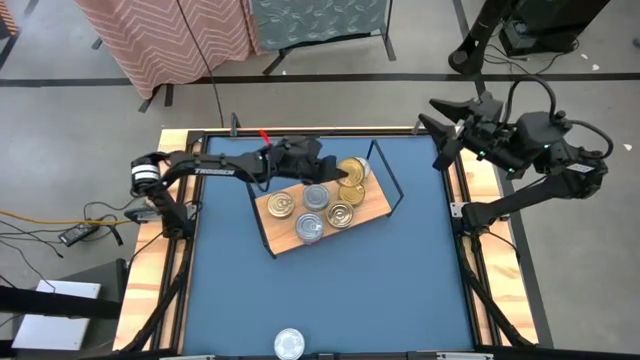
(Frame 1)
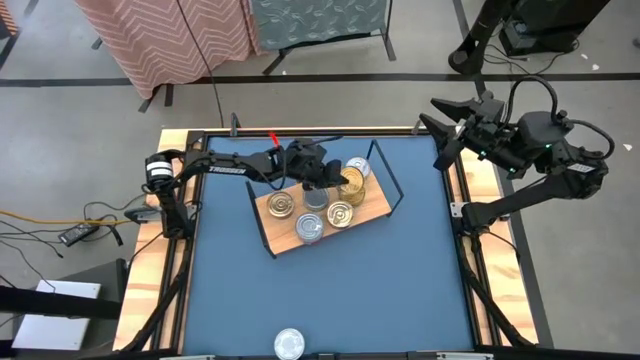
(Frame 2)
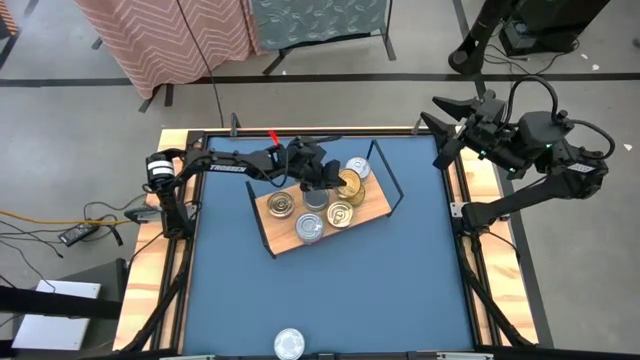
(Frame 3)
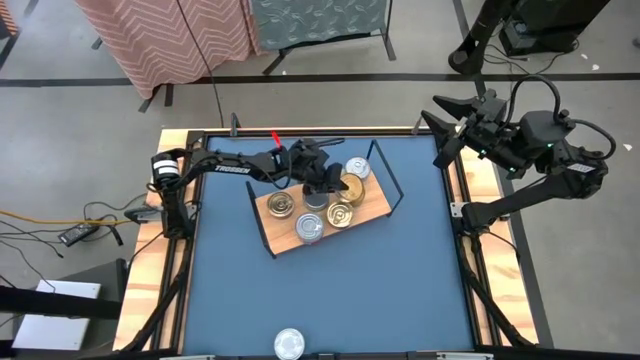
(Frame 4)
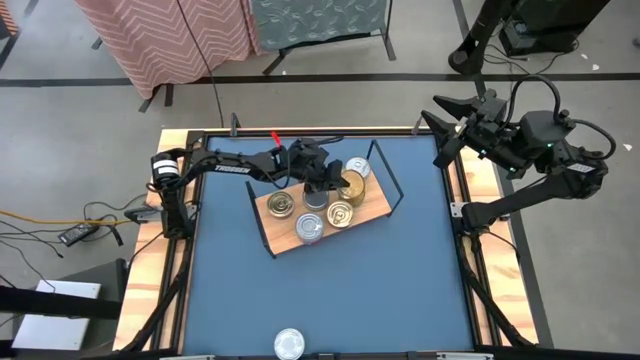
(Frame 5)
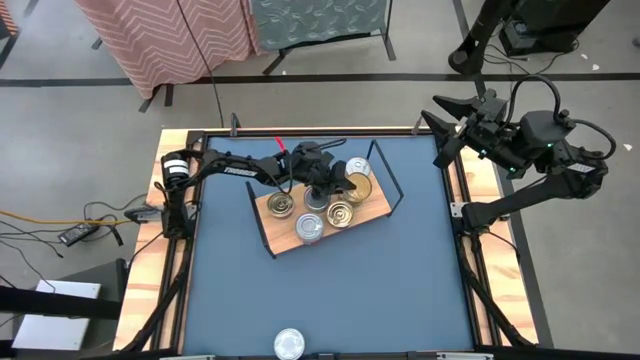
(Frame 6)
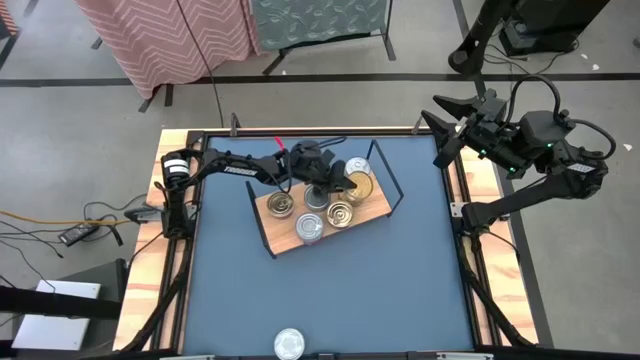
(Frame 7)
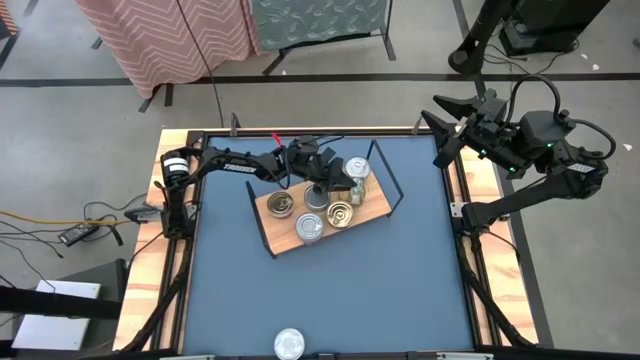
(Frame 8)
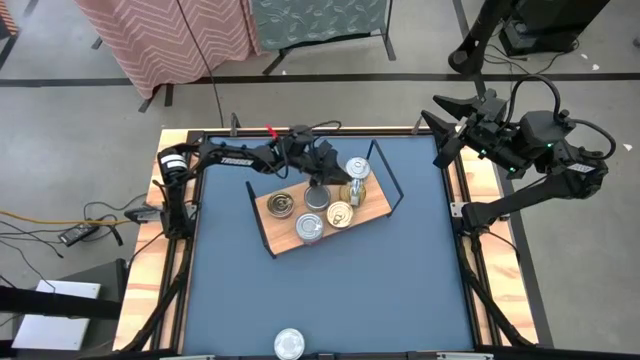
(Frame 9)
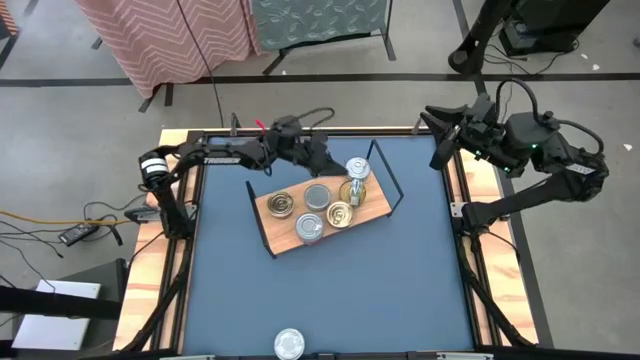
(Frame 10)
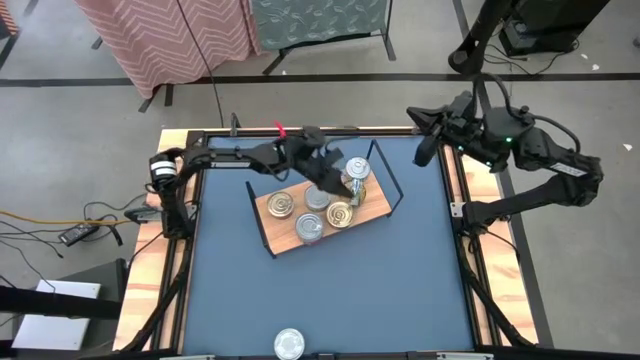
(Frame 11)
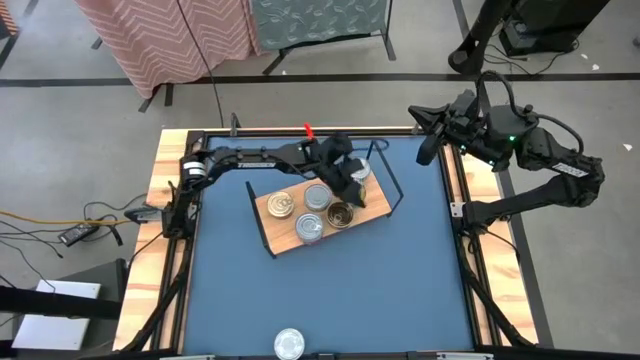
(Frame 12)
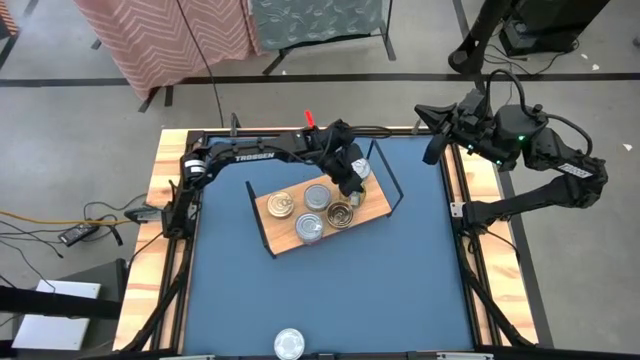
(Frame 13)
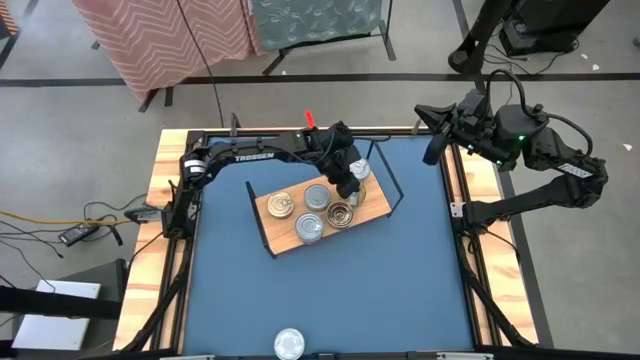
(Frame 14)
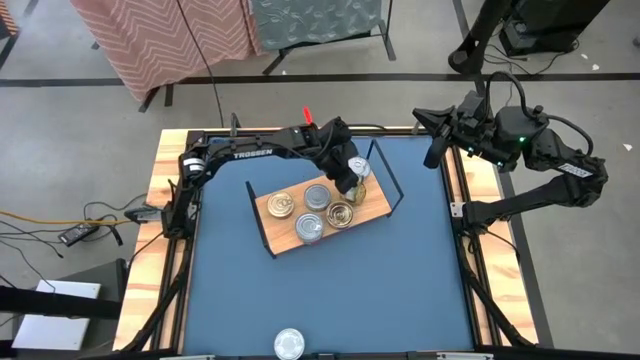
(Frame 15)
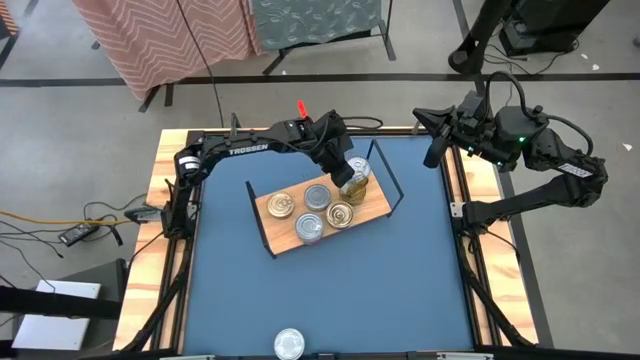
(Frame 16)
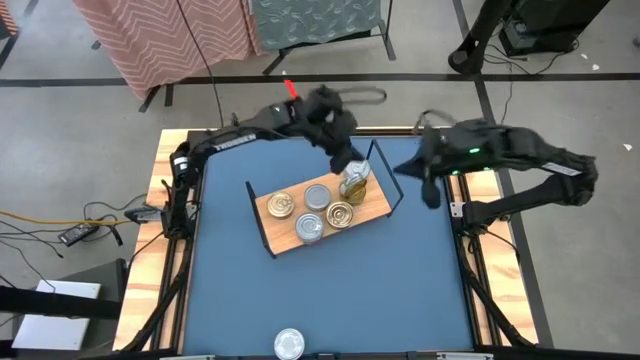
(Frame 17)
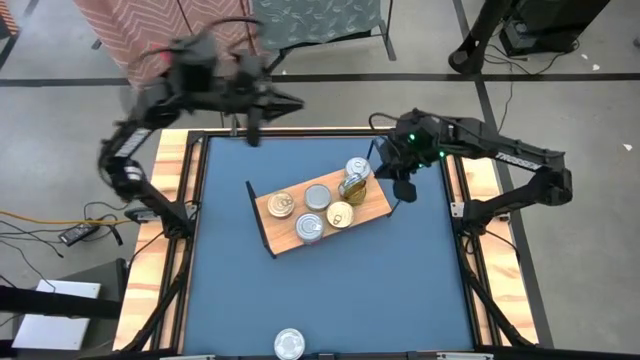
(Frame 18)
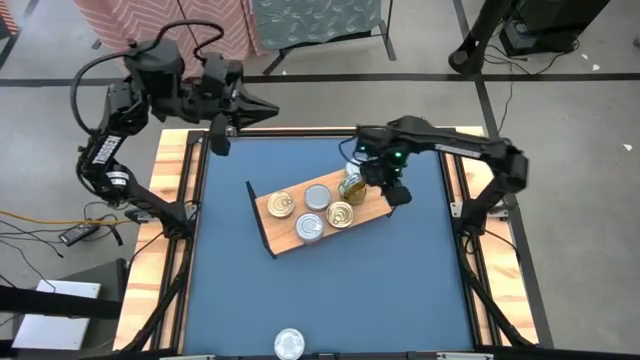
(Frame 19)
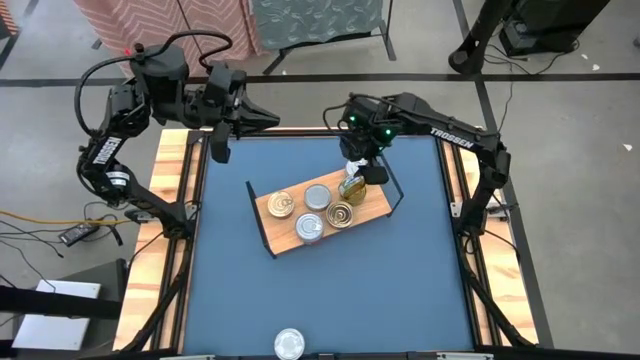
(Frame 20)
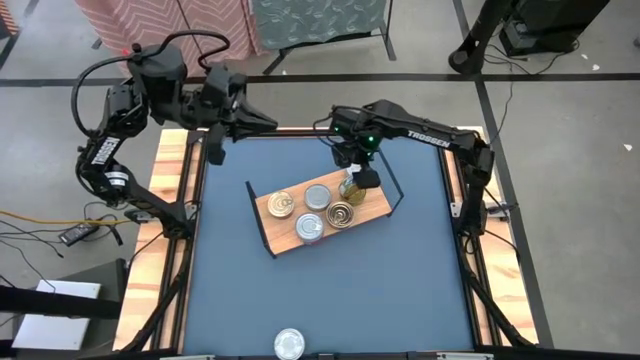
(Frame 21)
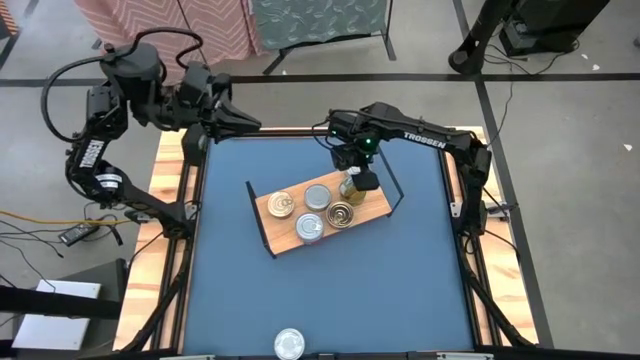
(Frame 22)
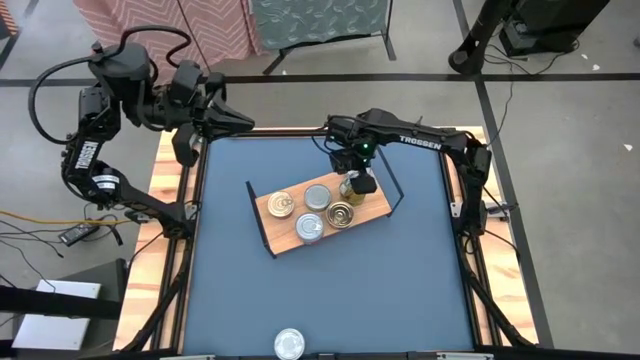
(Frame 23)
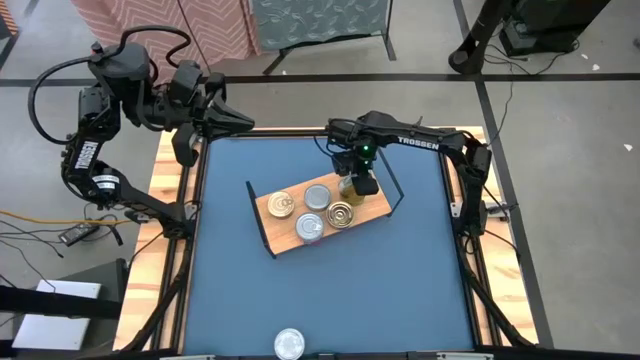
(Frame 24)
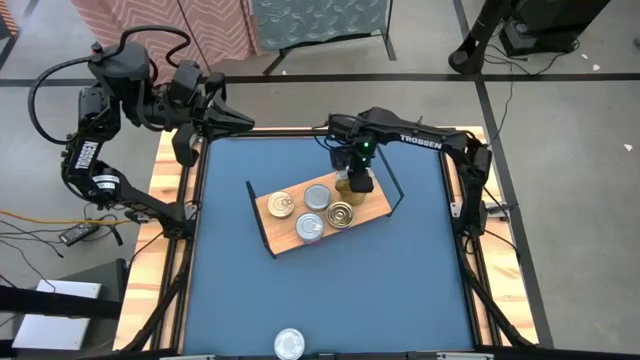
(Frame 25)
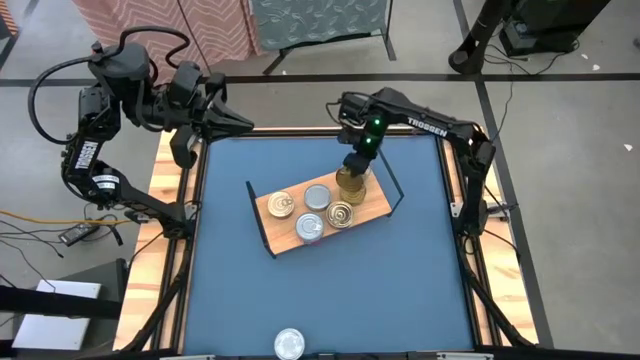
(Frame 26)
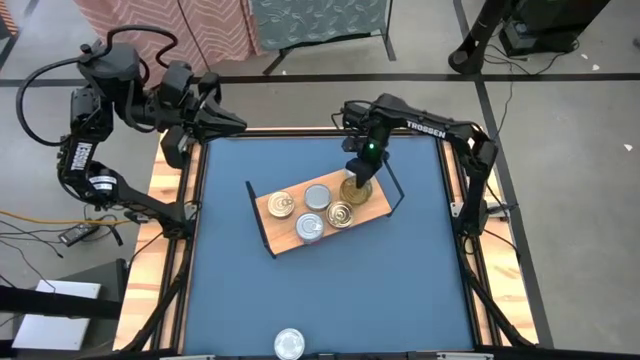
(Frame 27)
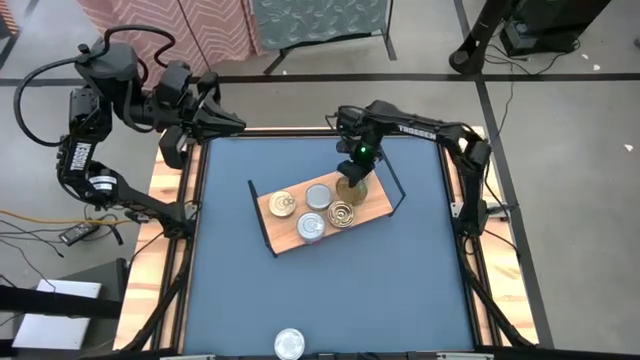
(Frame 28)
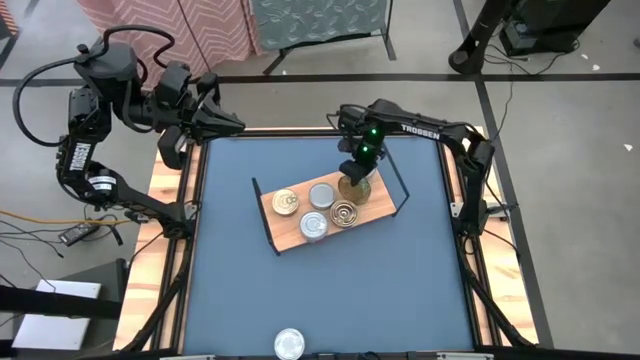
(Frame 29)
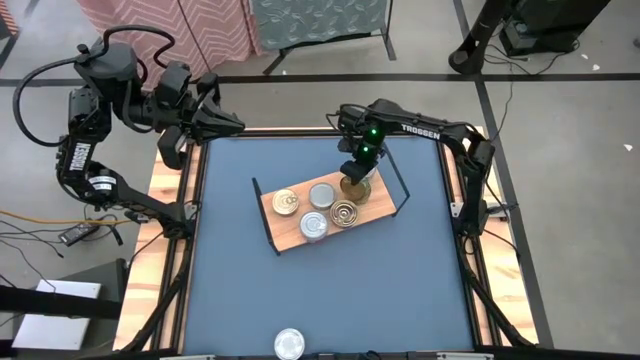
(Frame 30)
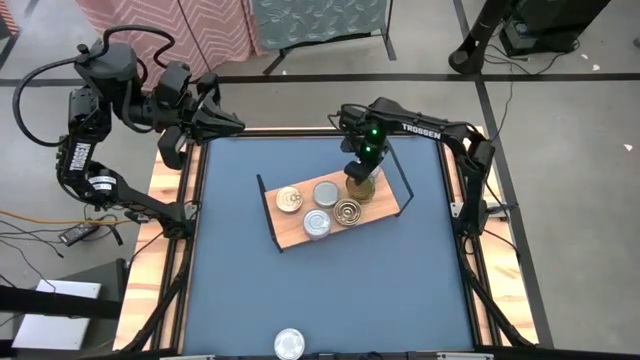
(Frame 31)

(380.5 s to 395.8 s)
Task: Stack canned seafood by type on shelf
Stack the green tuna can on top of the green tuna can on the shelf

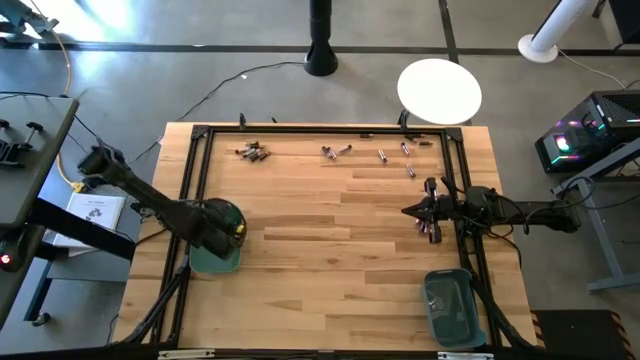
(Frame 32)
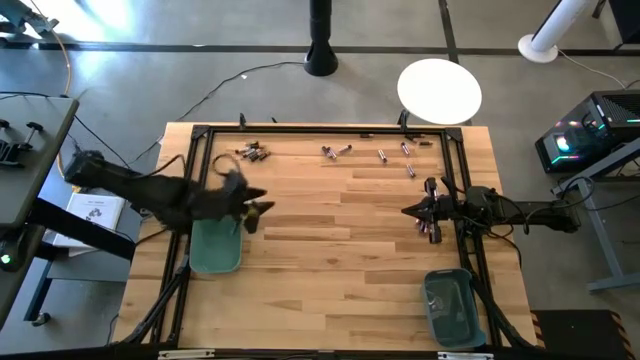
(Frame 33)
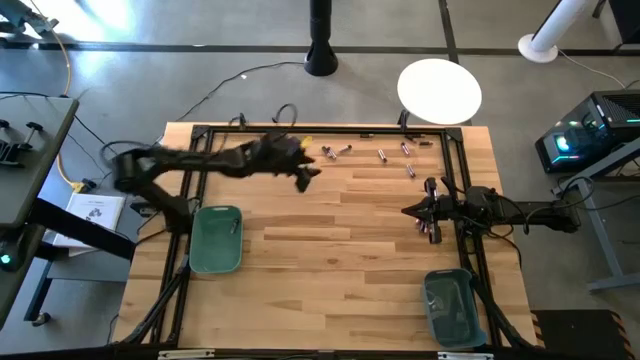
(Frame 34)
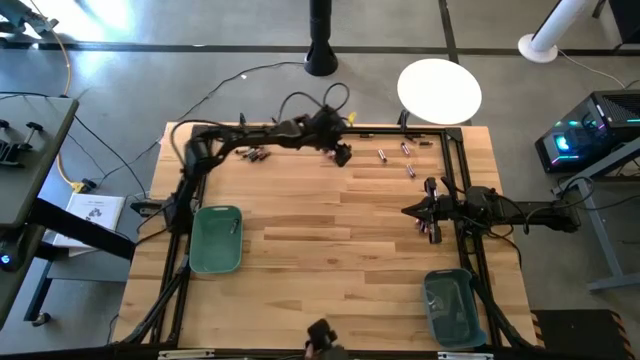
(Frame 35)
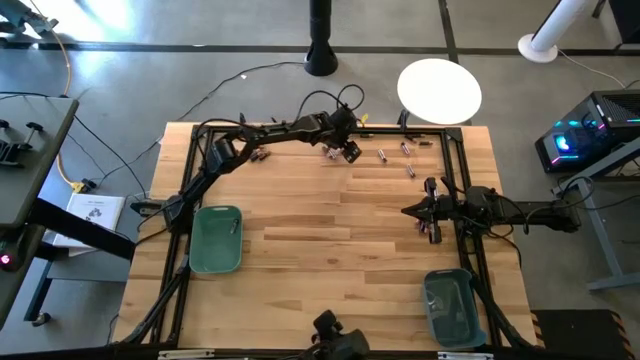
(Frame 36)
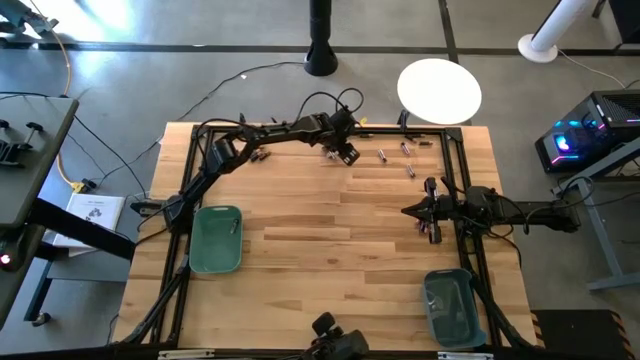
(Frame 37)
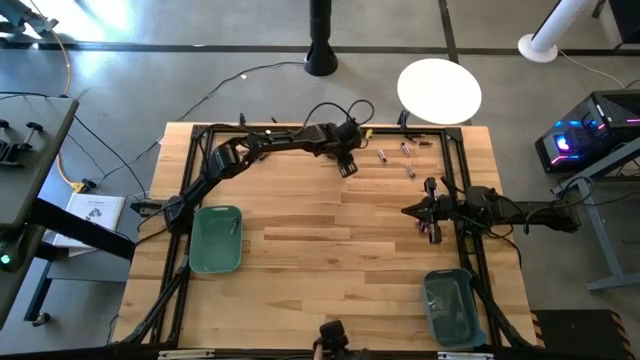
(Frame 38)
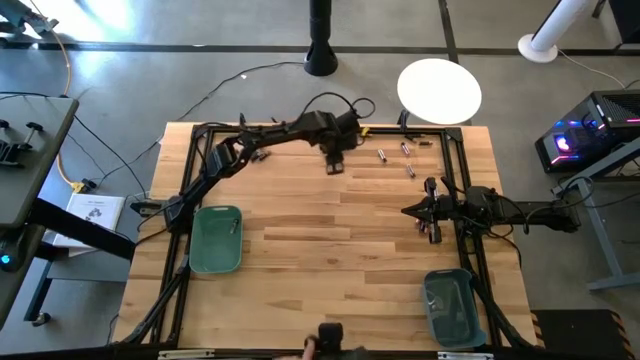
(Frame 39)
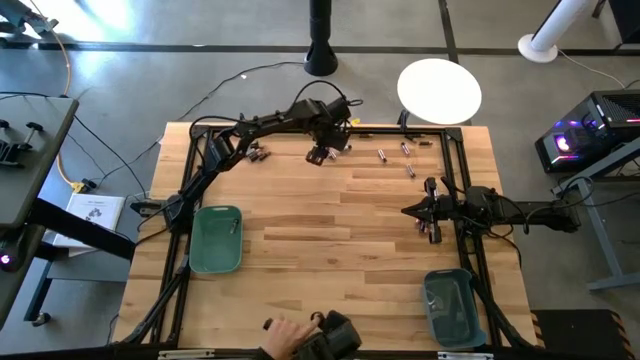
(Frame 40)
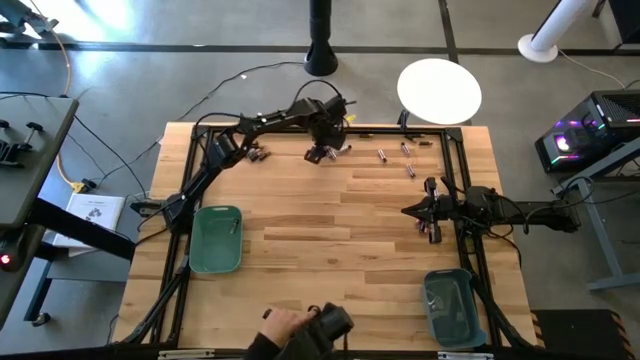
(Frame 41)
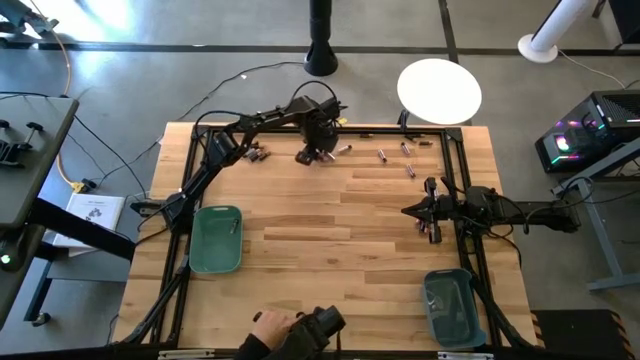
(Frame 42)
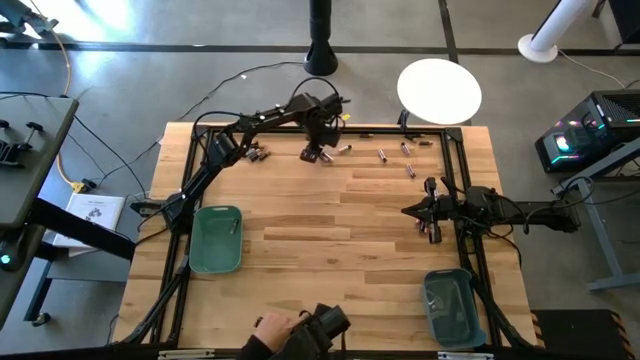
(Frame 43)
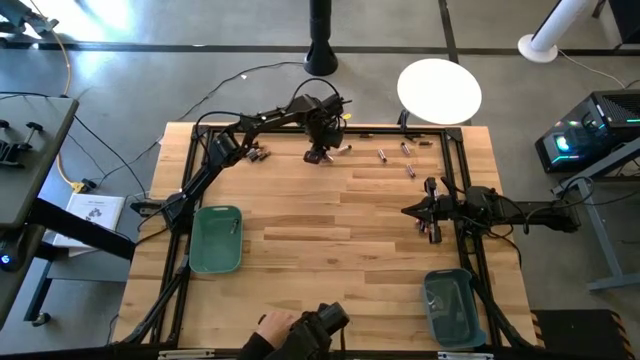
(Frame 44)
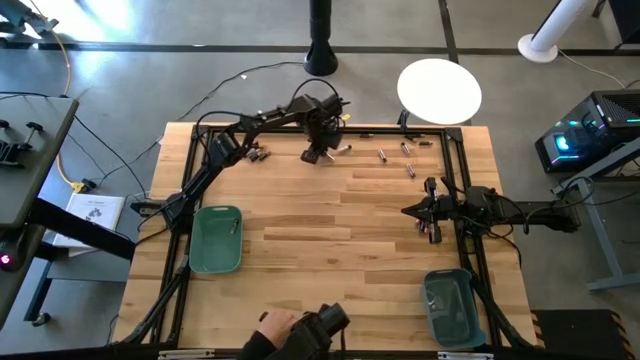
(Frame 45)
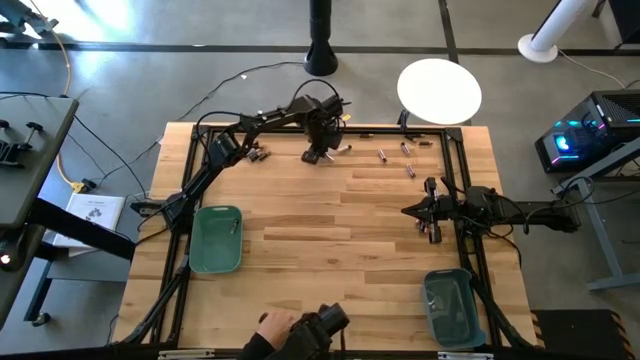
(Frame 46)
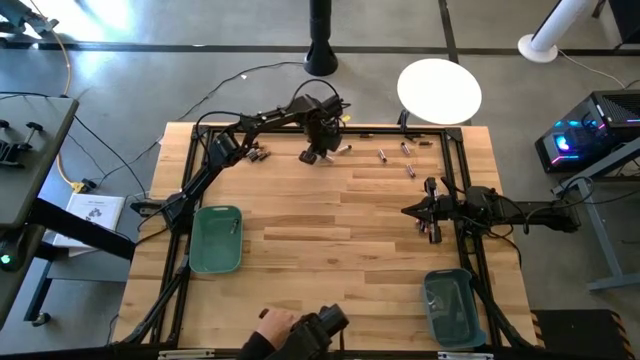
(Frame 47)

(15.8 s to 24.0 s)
Task: Sort batteries
Put the silver battery into the green bin
